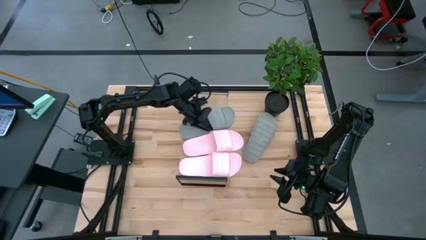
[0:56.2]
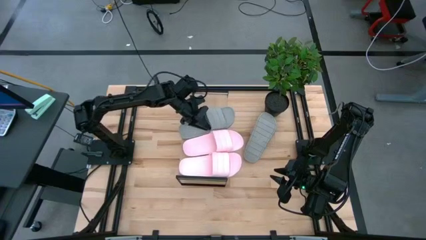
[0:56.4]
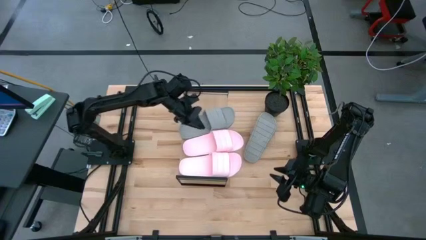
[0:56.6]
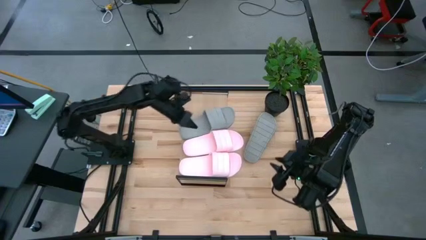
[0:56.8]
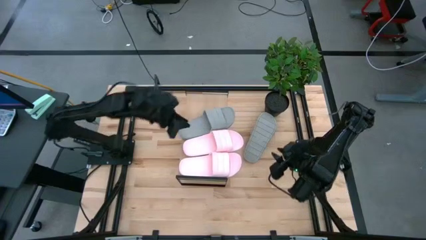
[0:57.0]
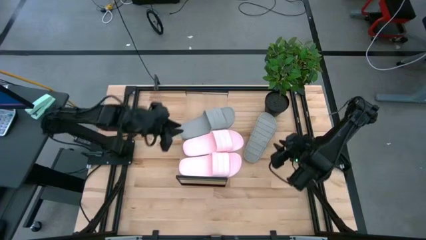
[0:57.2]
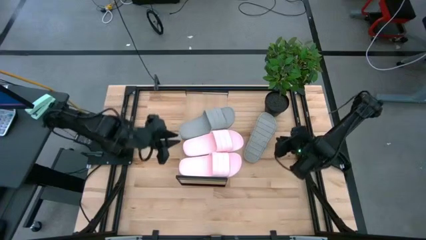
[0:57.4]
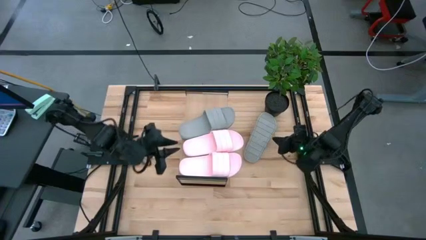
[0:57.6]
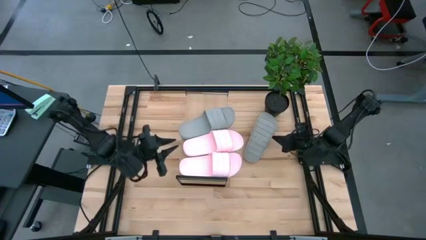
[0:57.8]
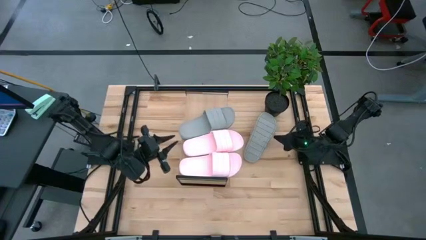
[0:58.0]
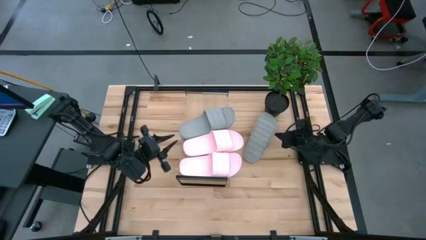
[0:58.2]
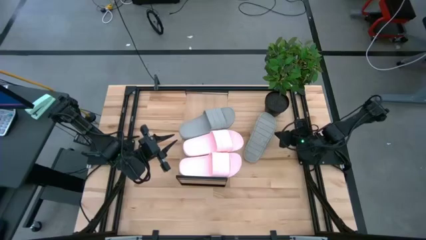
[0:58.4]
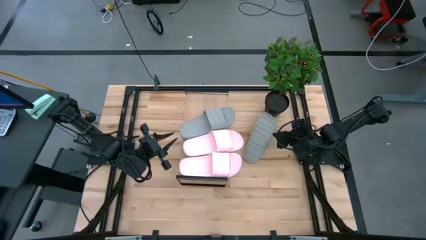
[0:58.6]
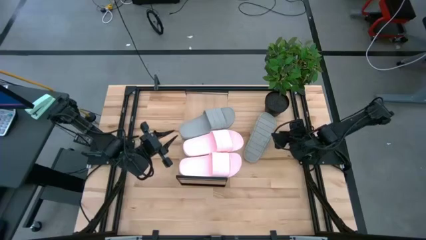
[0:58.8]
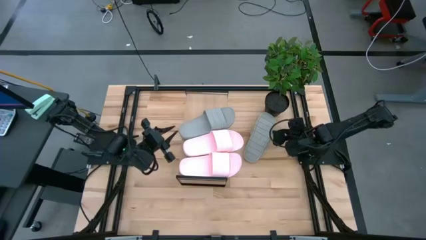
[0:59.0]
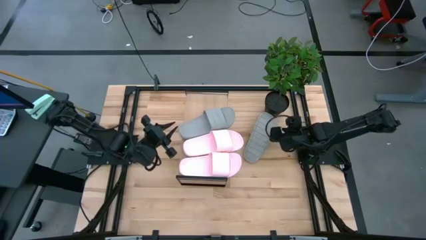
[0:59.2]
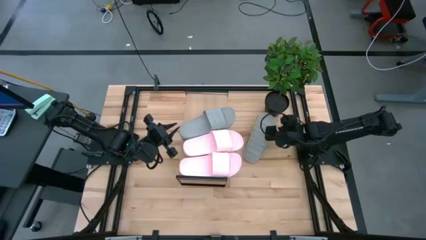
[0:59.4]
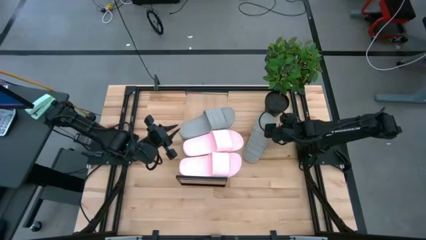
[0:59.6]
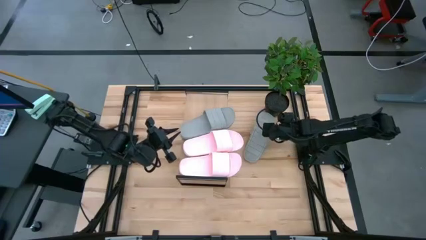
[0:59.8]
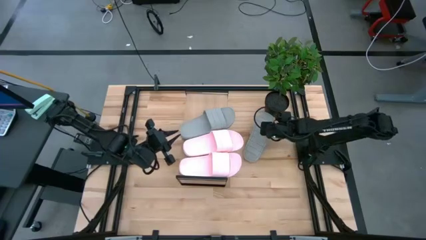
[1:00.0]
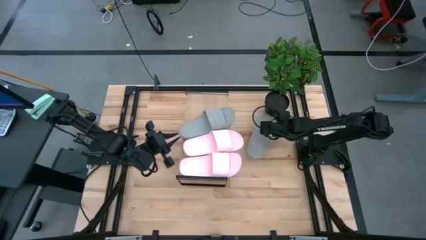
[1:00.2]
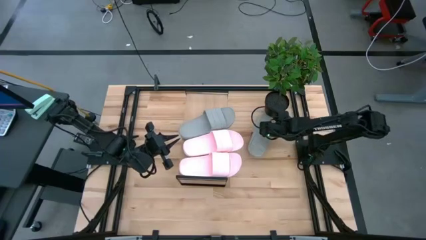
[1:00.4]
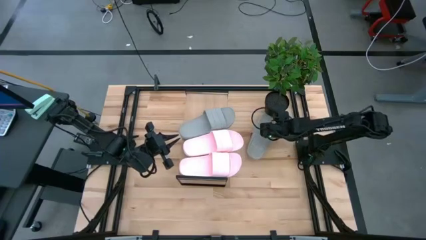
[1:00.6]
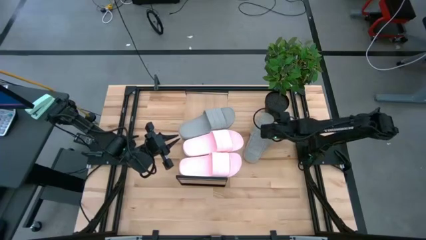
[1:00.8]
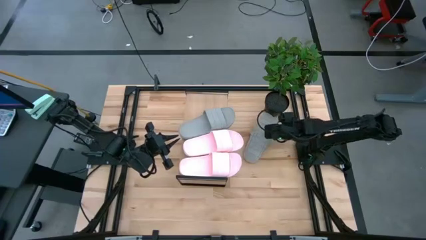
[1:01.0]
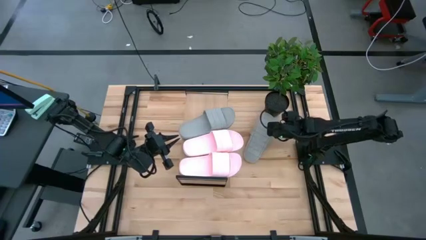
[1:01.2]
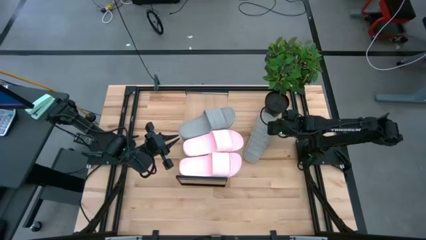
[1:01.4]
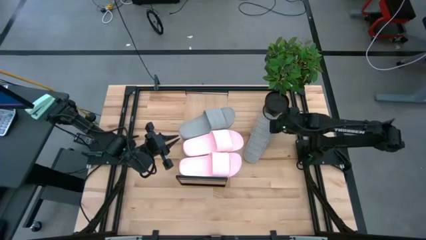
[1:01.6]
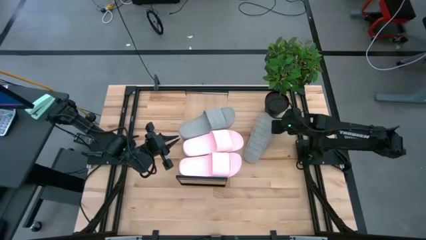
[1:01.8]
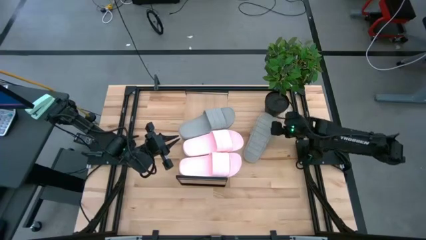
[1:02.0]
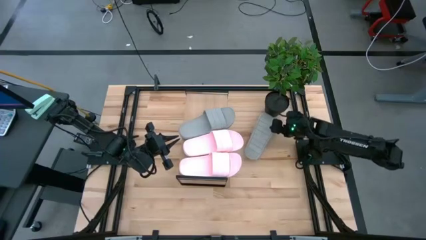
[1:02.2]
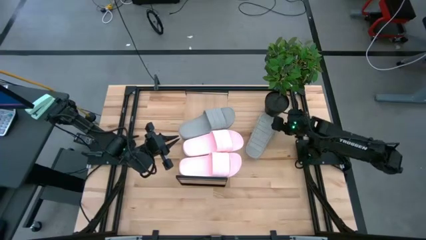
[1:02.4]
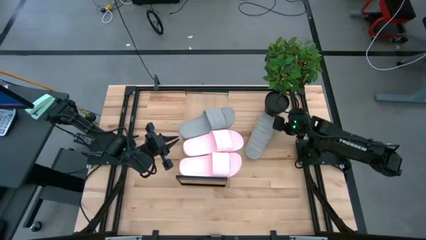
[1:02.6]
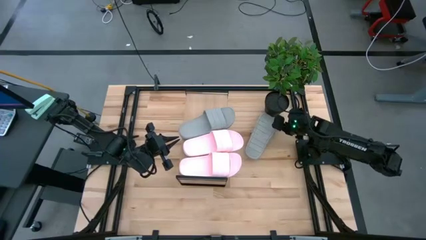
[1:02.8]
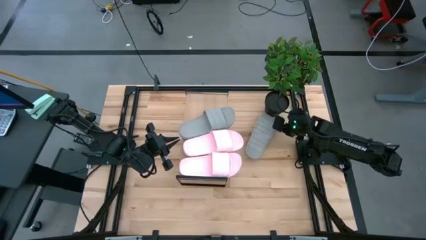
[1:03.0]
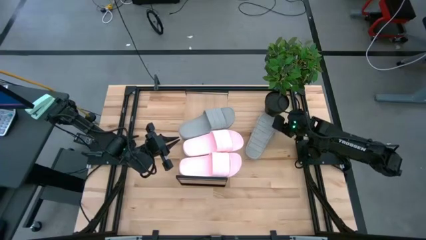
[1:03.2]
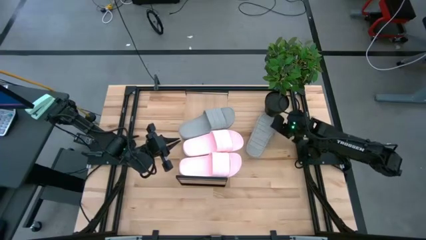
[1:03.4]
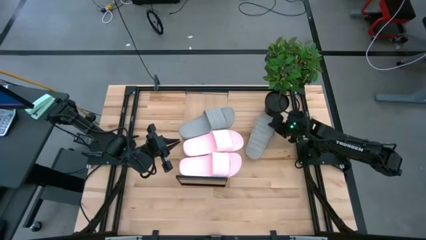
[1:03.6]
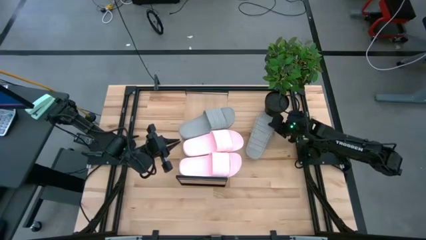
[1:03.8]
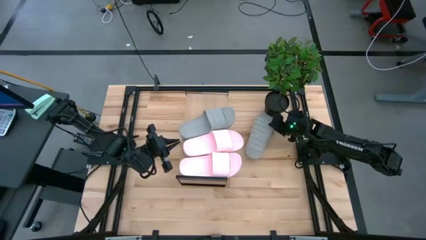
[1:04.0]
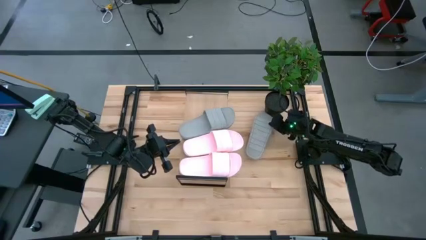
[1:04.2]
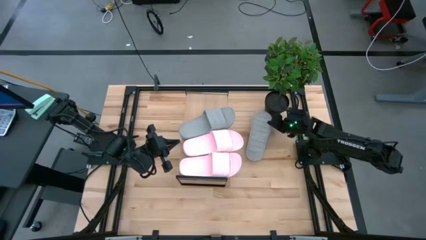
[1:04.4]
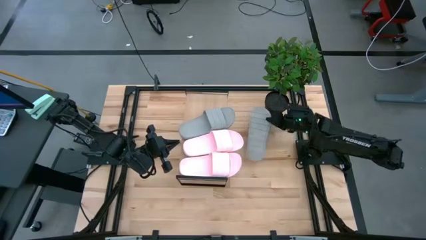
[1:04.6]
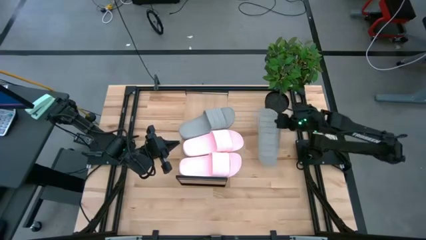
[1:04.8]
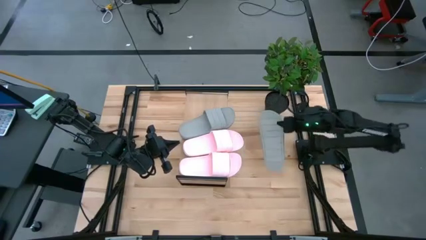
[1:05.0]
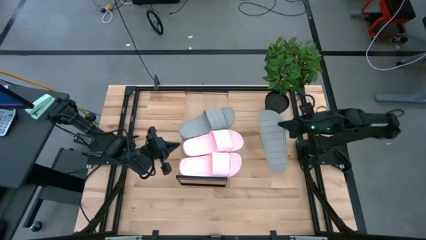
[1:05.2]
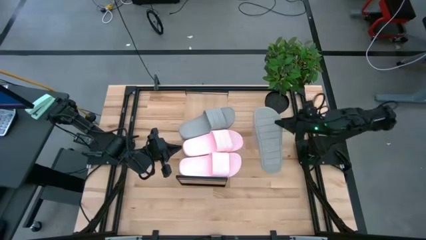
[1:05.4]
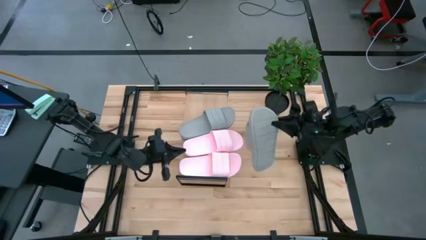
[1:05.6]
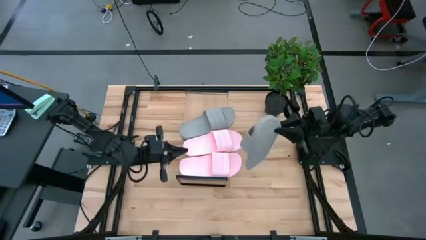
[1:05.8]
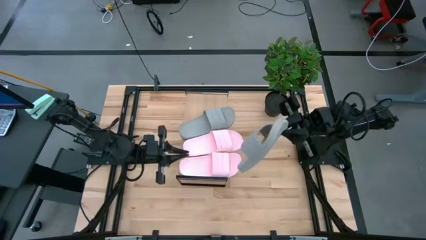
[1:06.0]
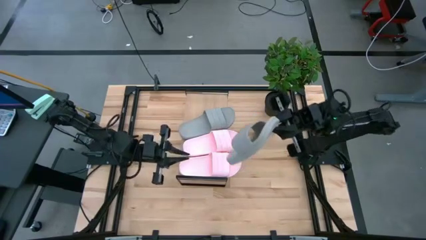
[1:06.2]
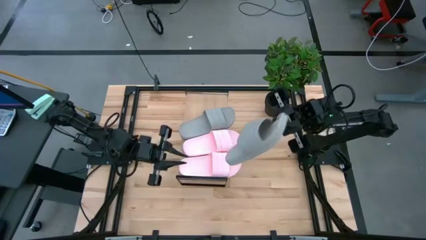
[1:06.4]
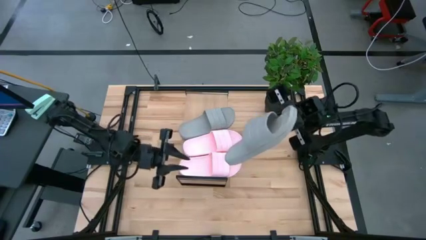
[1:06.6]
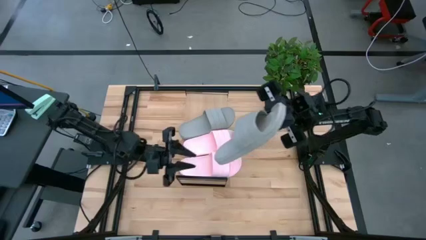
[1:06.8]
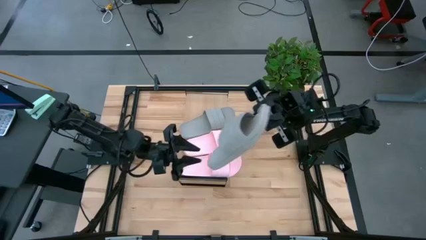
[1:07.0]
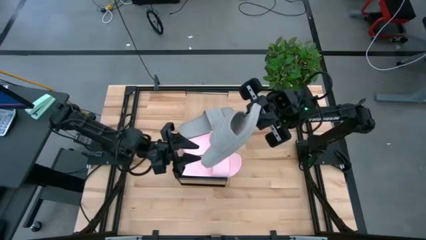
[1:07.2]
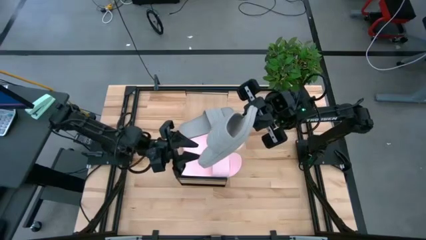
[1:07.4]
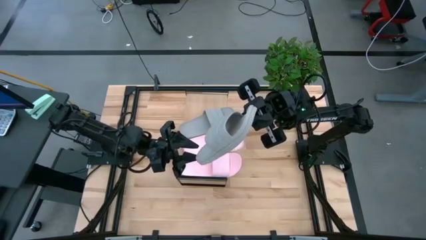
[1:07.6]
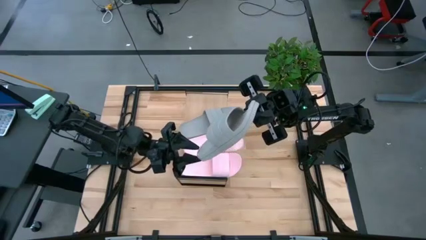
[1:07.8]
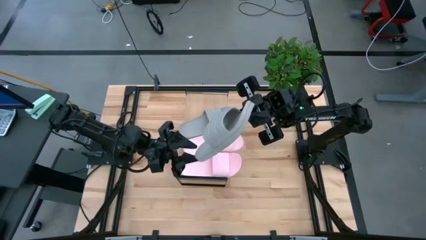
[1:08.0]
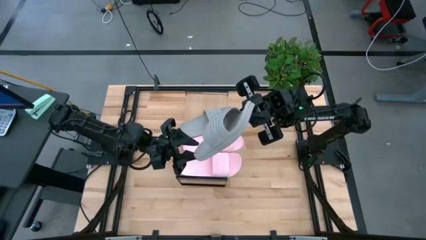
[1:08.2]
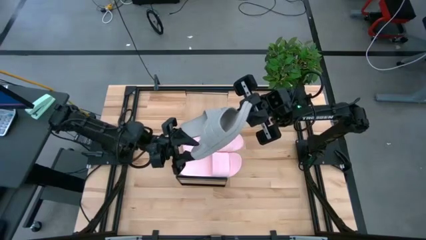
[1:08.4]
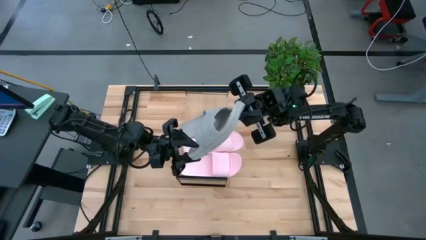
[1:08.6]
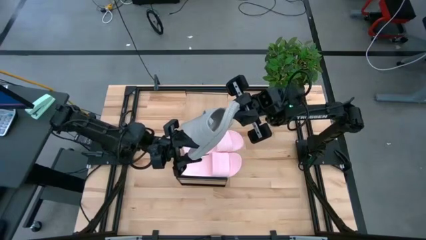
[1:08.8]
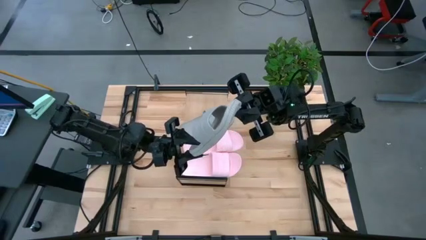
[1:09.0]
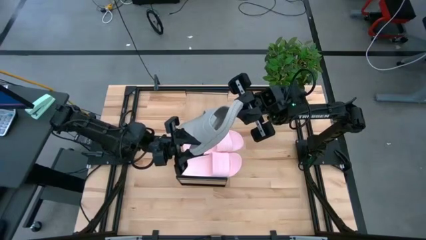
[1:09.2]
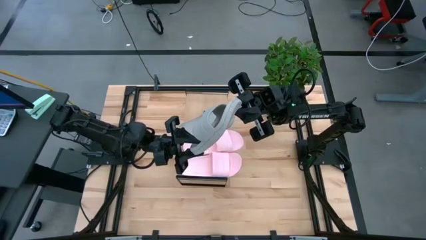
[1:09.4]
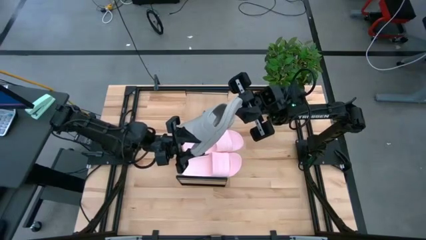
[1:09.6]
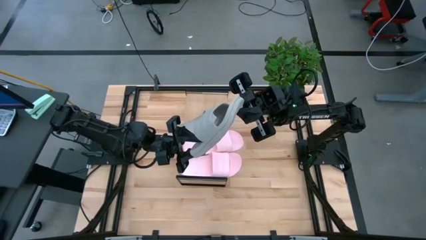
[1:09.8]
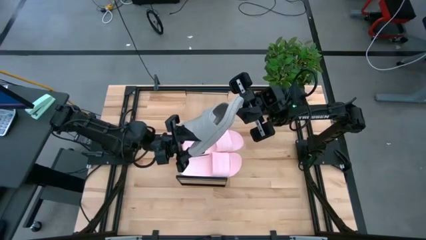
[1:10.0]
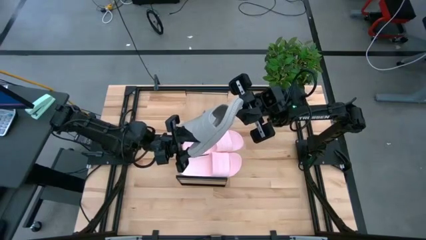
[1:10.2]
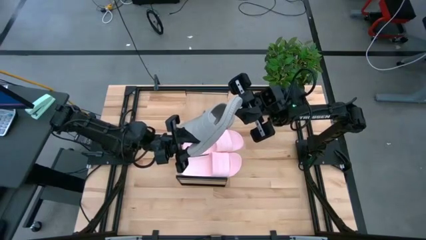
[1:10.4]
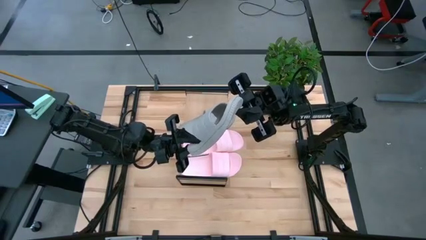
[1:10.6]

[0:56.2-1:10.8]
Task: Pick and place slides into the shelf
Put the gray slides on top of the shelf
